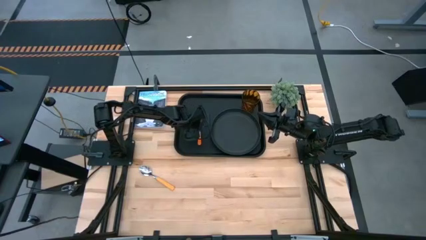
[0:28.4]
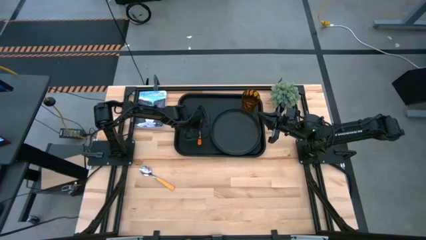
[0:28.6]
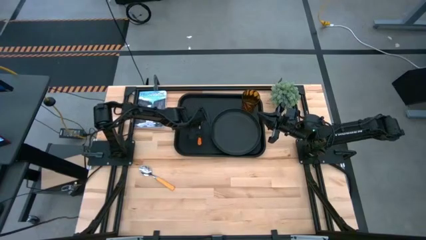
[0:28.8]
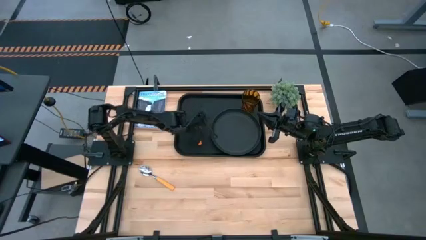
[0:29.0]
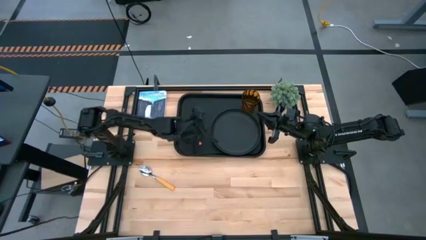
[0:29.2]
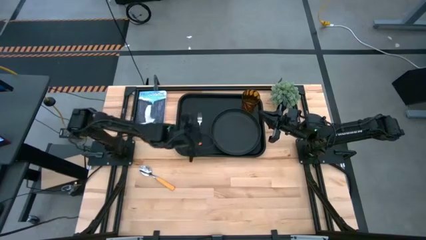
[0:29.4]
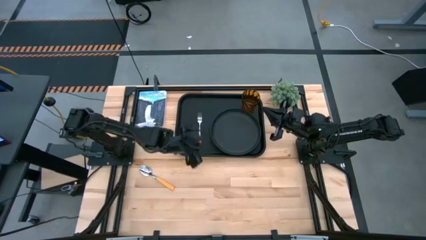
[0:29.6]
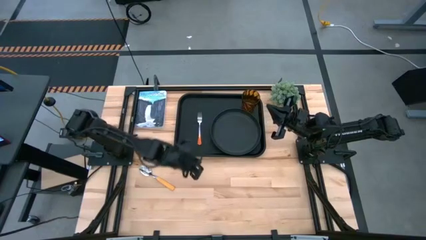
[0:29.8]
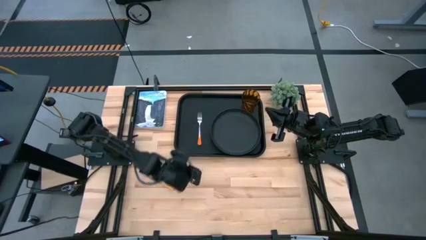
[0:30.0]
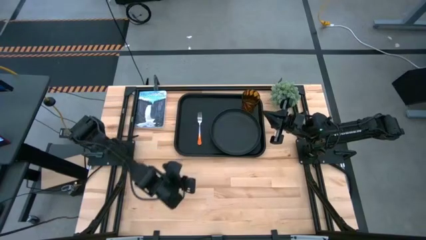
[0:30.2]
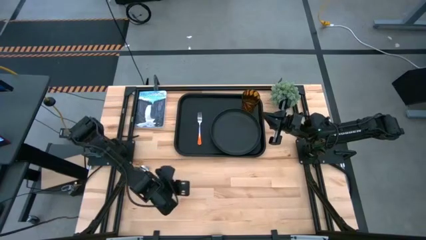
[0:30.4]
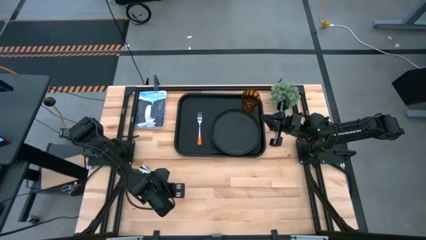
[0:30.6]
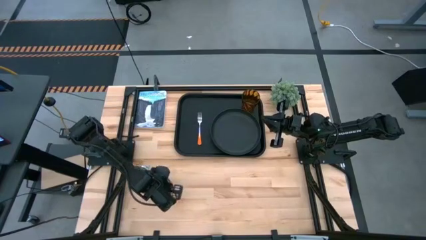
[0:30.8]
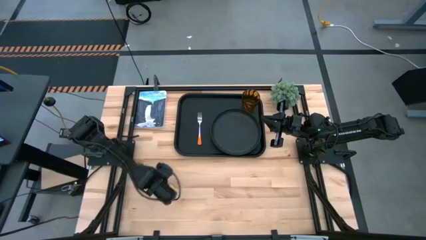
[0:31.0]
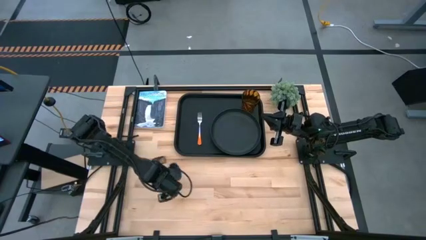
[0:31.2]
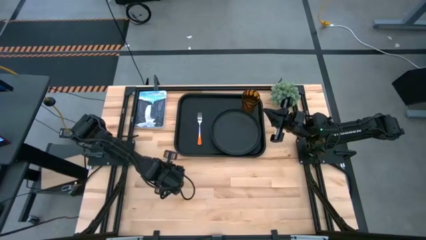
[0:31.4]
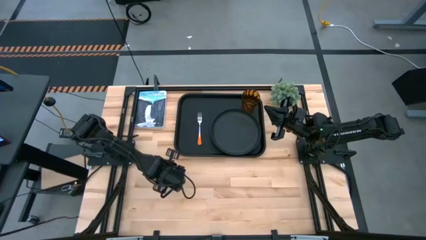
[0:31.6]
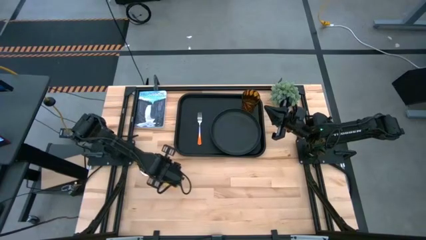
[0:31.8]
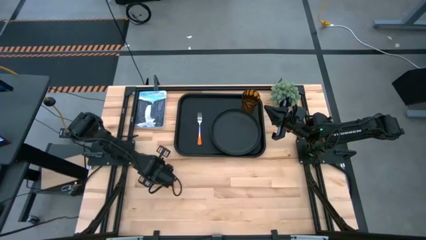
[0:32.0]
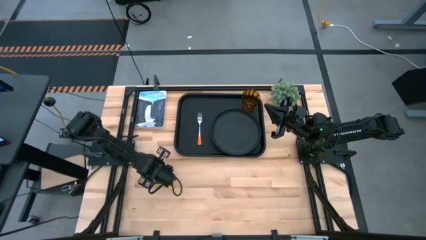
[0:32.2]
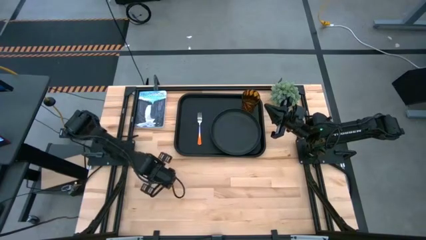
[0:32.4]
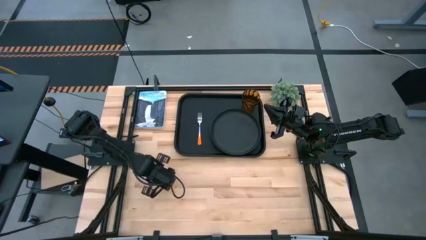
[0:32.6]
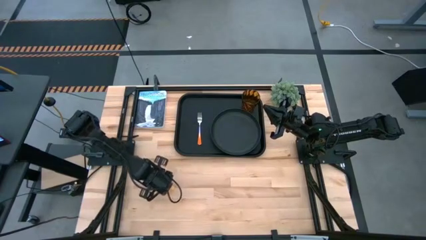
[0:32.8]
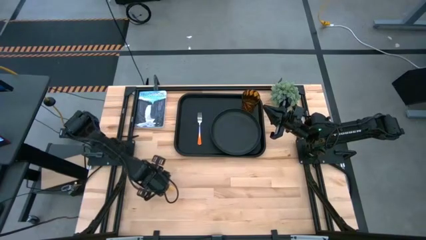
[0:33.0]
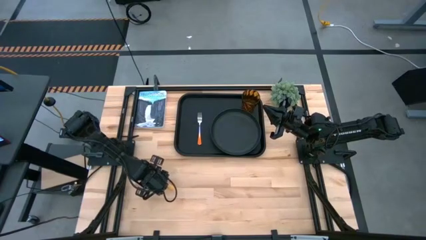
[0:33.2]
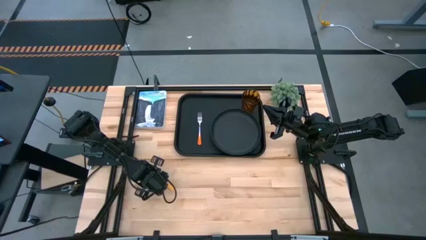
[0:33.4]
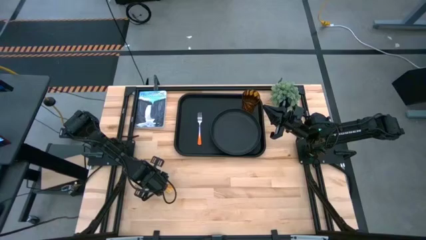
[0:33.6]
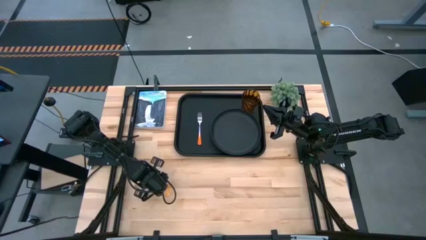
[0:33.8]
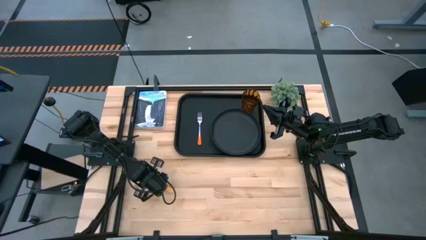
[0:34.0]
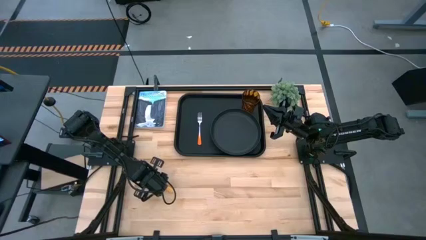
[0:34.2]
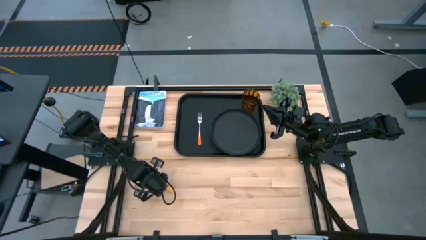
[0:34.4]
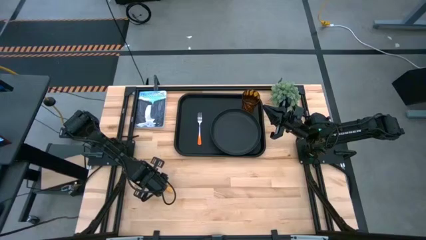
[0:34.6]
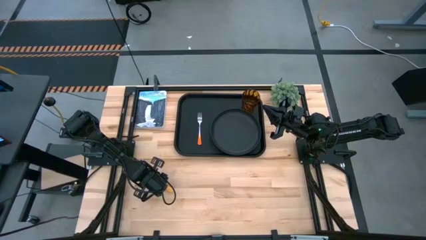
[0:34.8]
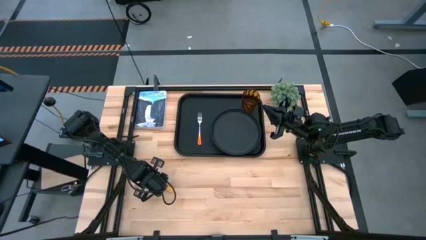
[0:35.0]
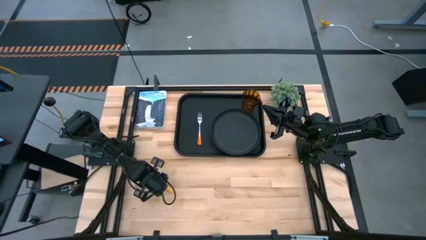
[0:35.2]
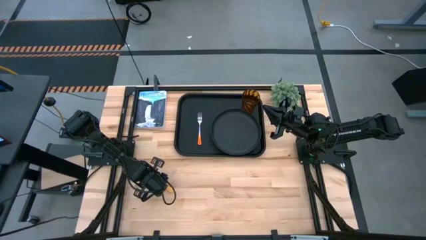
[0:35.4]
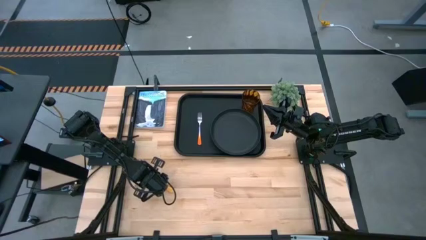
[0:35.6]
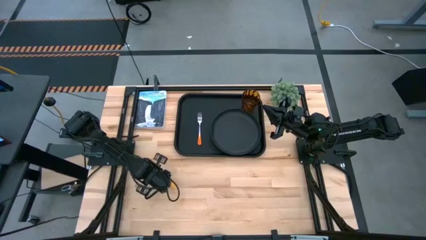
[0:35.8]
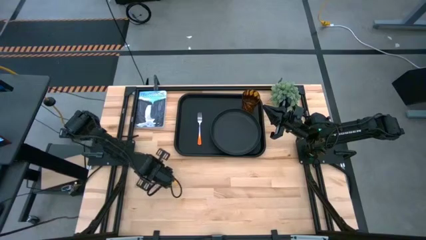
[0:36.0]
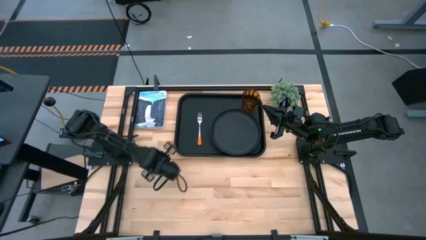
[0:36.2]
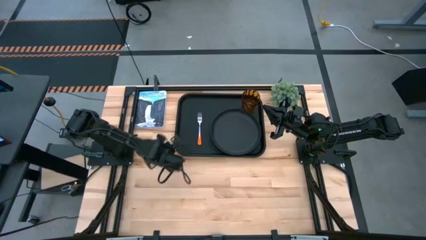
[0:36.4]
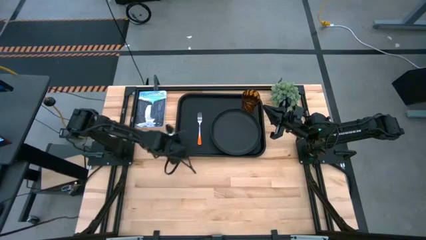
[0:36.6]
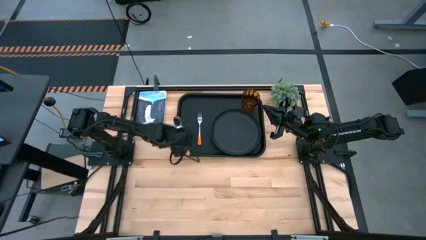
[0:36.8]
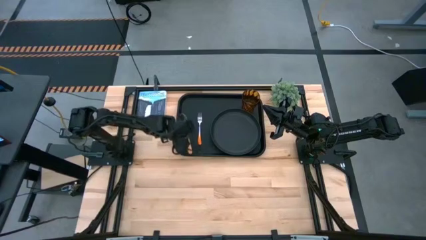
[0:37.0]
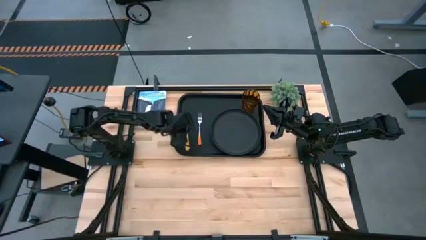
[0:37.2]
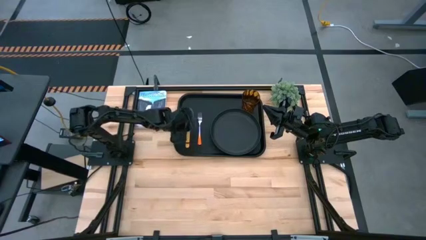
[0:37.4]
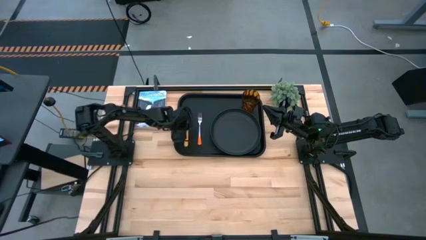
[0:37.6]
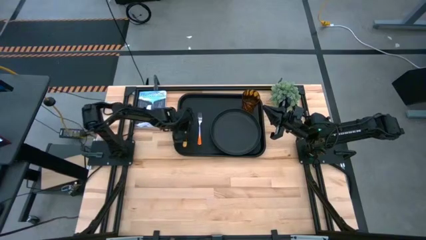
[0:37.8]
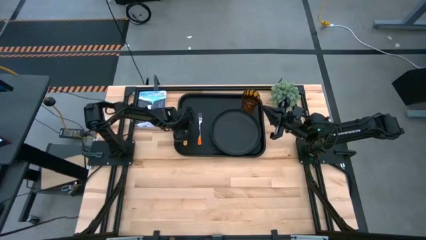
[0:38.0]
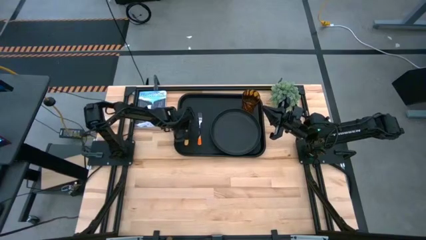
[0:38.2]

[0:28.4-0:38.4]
Task: Pick and place plate/cup/fork/spoon on tray
Put the yellow spoon on the black tray to the left of the orange spoon

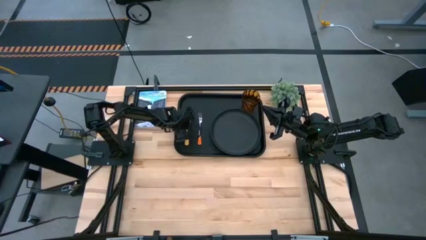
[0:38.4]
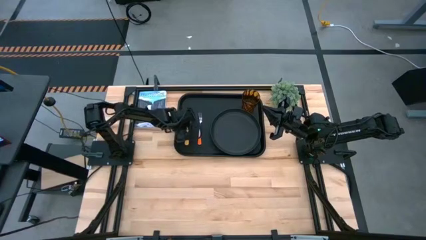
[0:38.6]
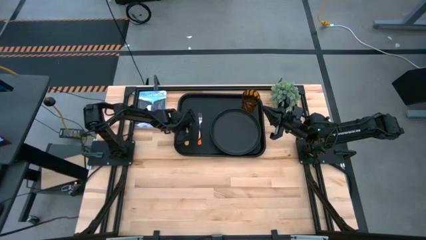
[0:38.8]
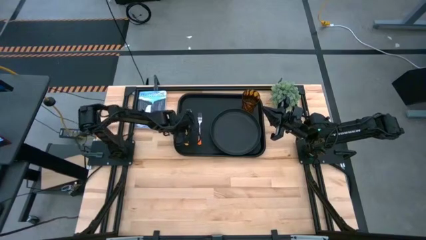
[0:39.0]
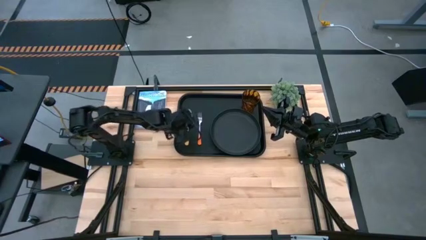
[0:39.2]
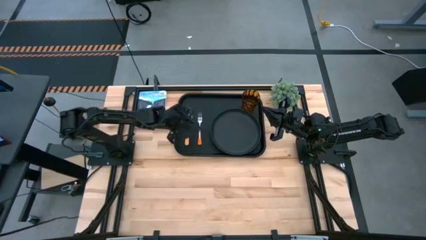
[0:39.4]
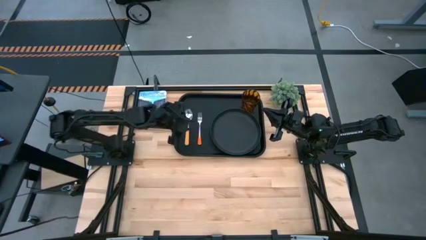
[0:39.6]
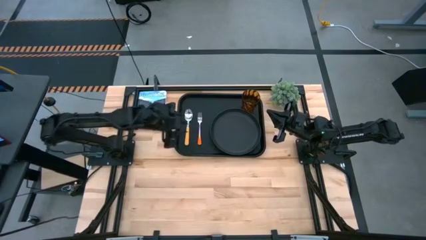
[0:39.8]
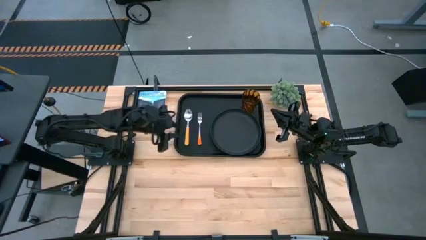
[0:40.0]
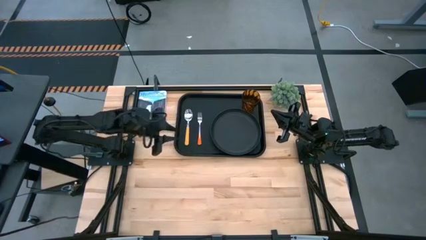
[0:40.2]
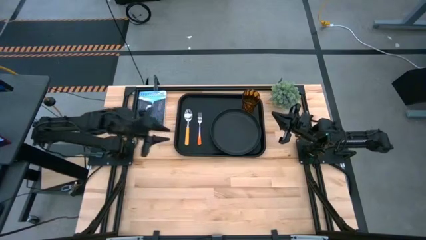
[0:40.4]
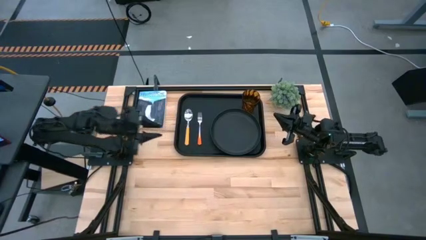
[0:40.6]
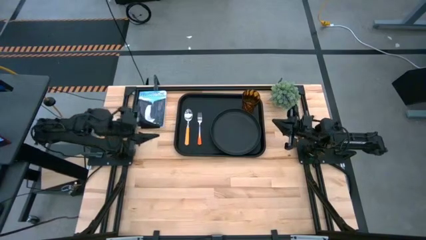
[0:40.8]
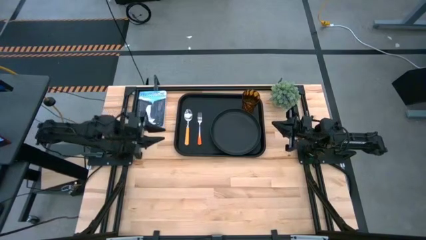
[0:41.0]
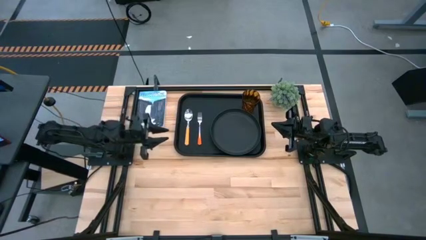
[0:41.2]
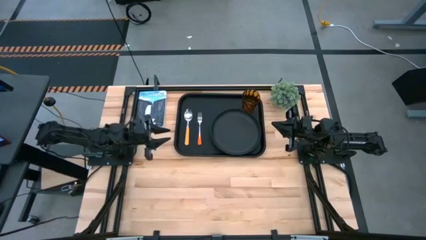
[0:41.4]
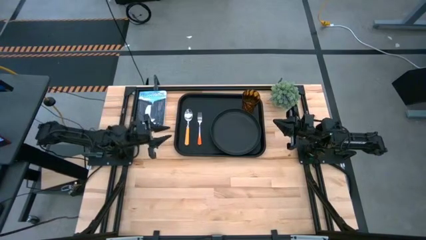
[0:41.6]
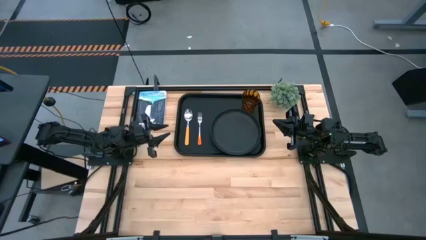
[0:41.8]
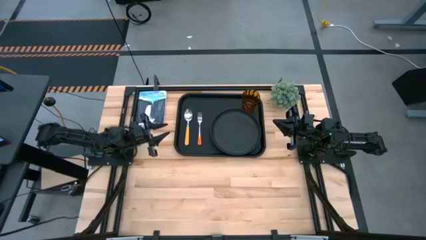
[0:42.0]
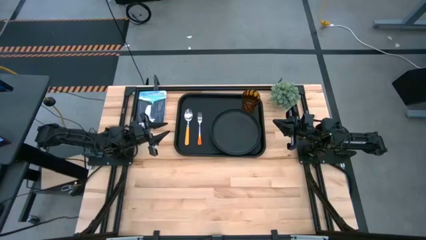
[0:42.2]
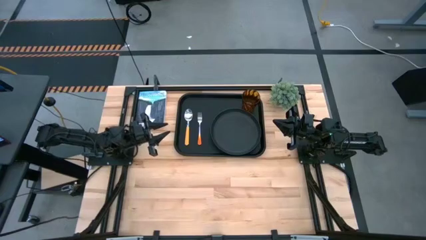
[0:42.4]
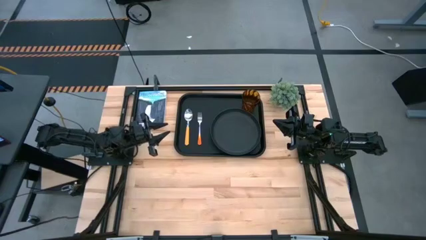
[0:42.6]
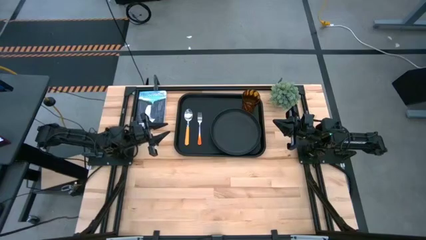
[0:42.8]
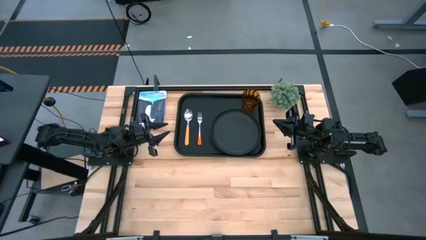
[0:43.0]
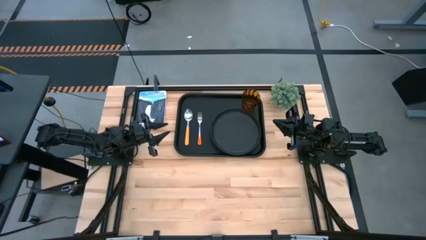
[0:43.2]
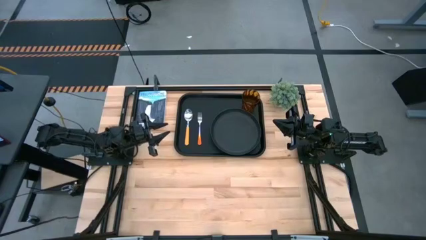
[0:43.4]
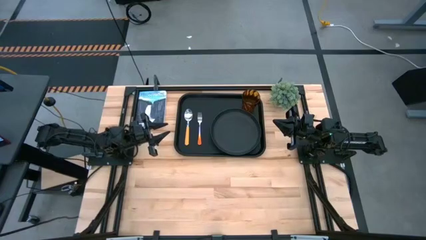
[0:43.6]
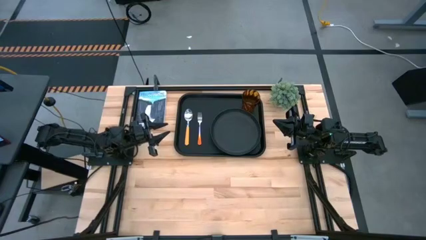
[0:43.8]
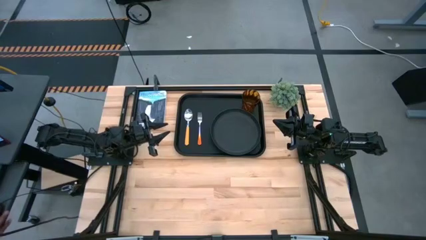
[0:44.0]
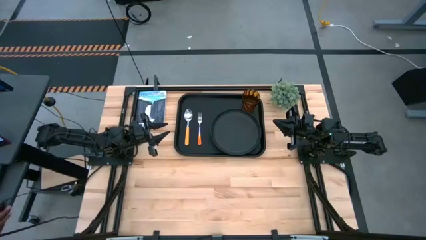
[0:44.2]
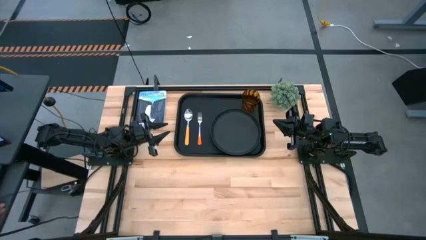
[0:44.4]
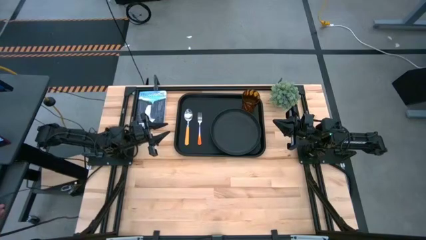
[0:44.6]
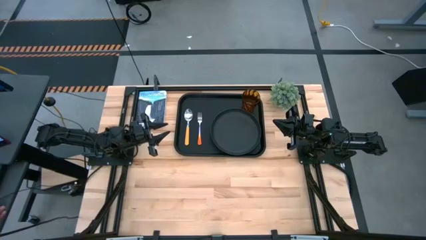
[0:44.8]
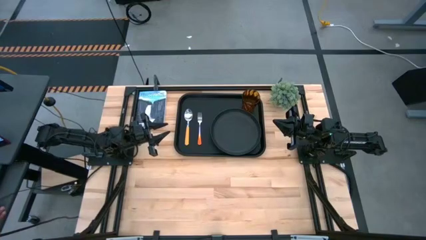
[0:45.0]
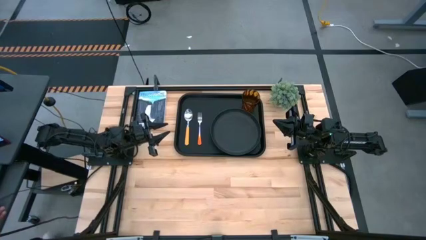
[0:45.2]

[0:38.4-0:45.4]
Return to Home Position
